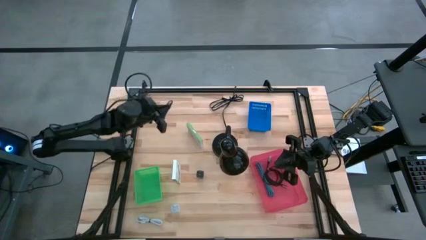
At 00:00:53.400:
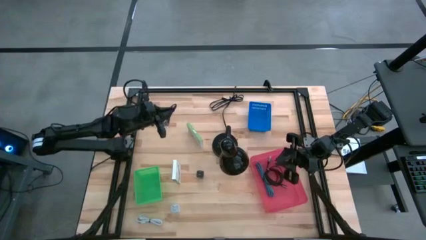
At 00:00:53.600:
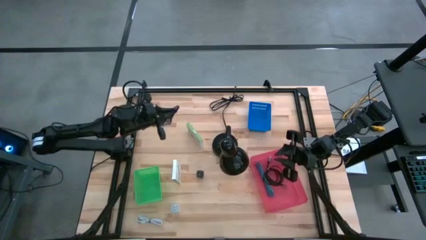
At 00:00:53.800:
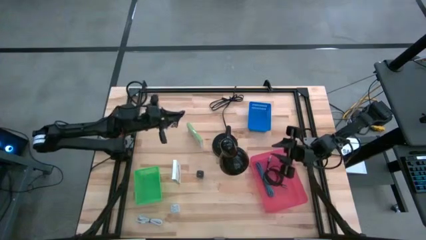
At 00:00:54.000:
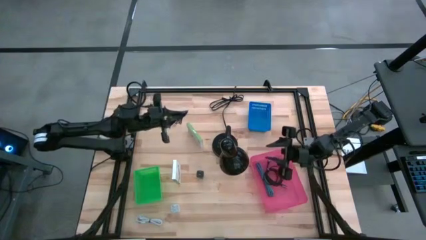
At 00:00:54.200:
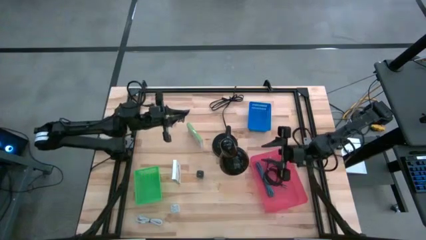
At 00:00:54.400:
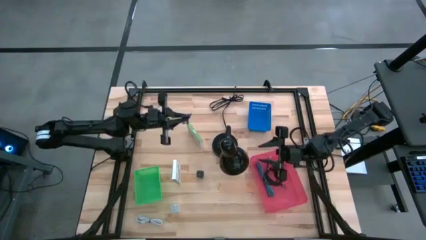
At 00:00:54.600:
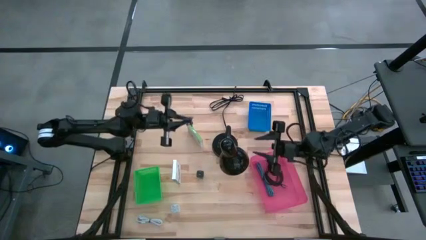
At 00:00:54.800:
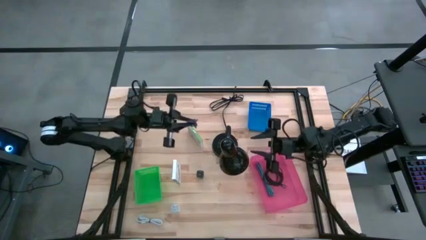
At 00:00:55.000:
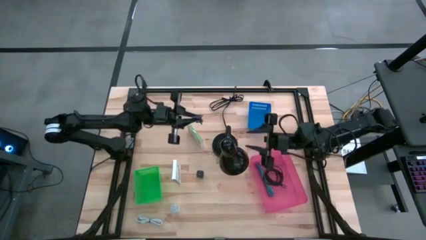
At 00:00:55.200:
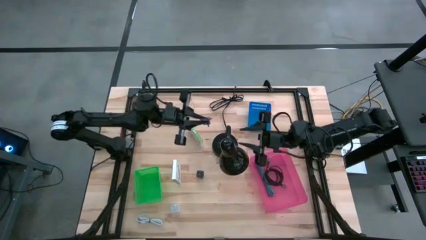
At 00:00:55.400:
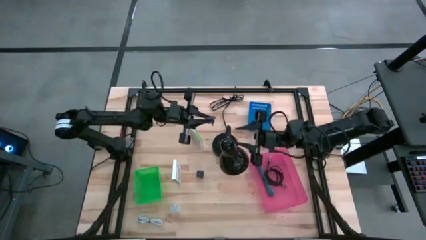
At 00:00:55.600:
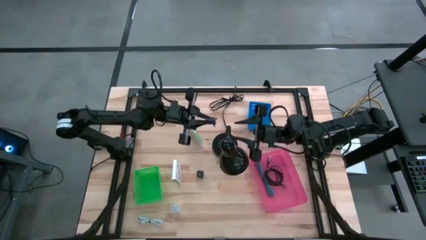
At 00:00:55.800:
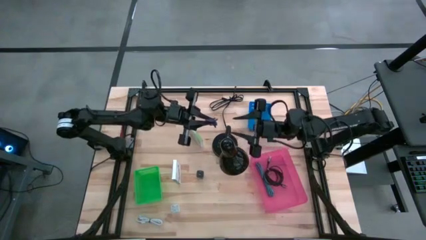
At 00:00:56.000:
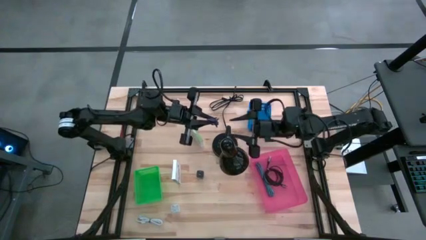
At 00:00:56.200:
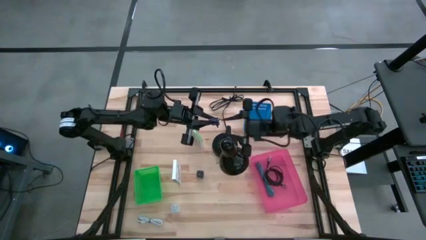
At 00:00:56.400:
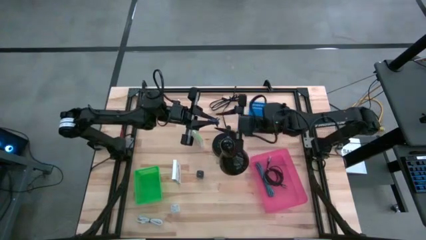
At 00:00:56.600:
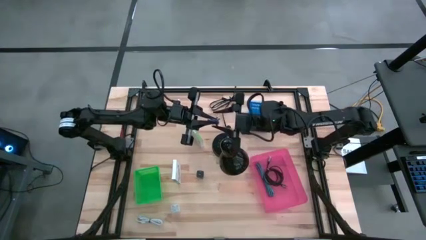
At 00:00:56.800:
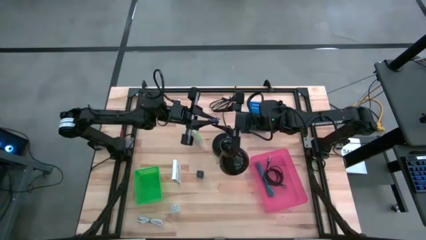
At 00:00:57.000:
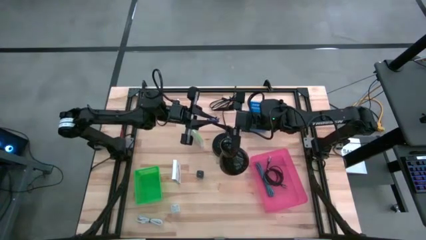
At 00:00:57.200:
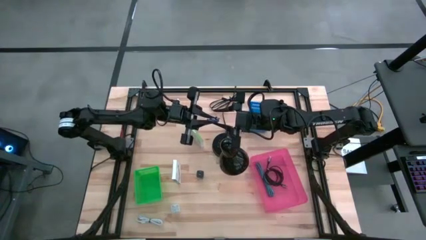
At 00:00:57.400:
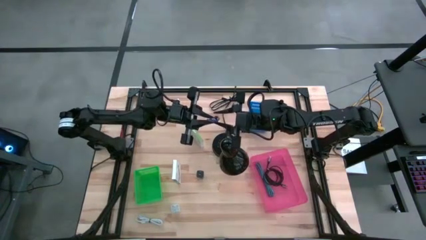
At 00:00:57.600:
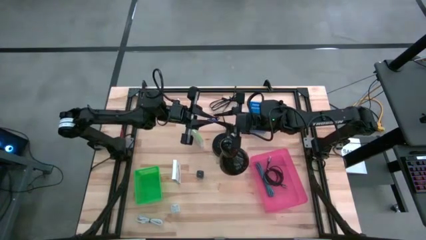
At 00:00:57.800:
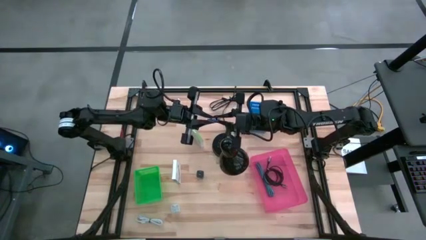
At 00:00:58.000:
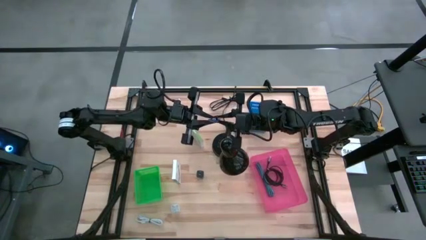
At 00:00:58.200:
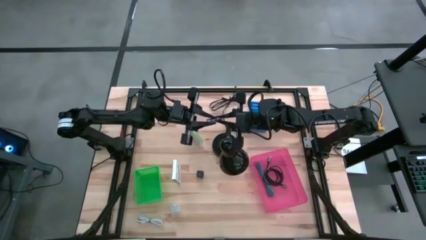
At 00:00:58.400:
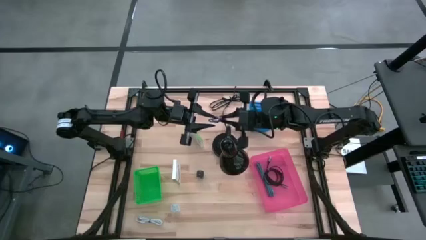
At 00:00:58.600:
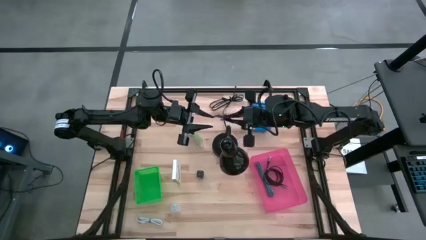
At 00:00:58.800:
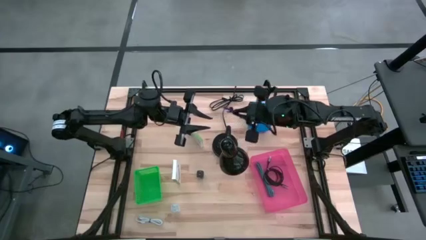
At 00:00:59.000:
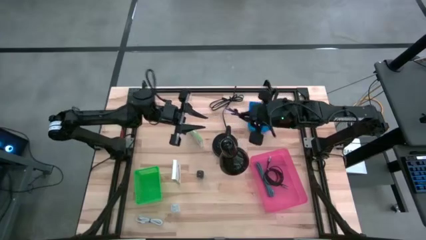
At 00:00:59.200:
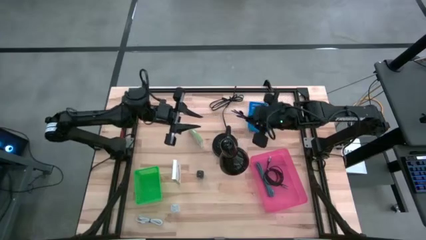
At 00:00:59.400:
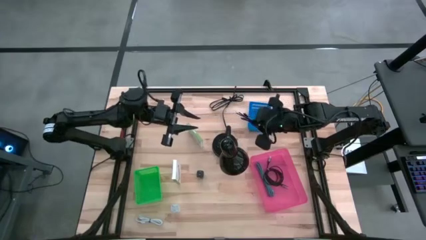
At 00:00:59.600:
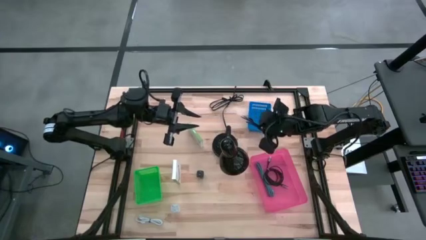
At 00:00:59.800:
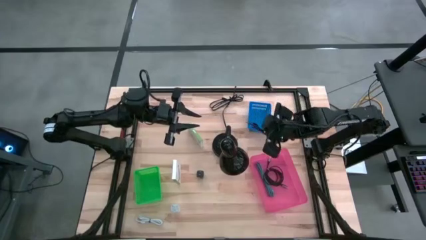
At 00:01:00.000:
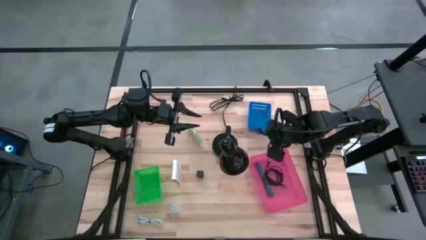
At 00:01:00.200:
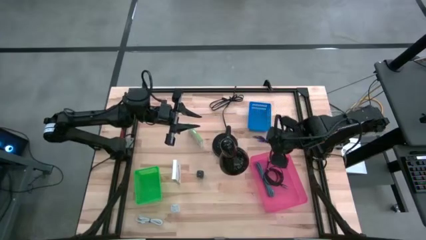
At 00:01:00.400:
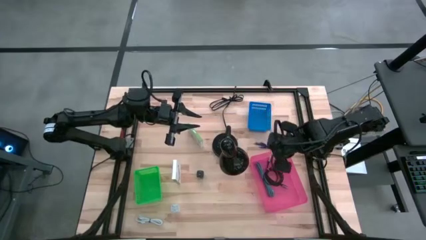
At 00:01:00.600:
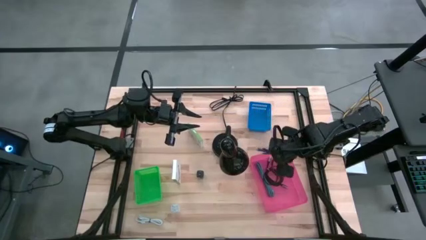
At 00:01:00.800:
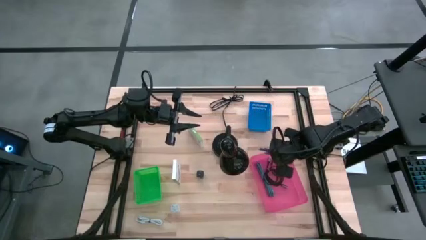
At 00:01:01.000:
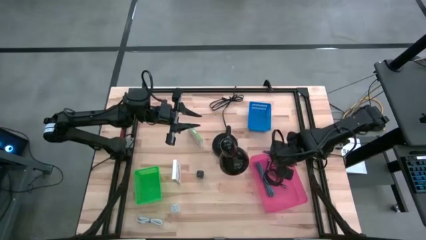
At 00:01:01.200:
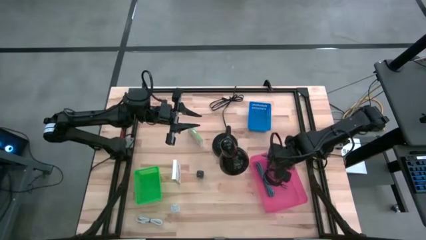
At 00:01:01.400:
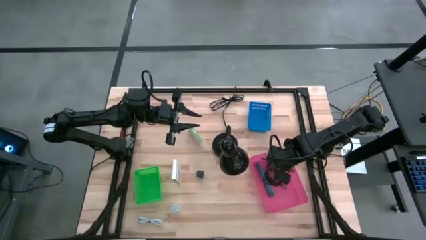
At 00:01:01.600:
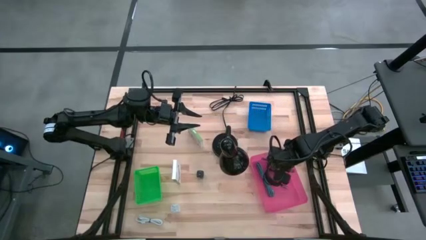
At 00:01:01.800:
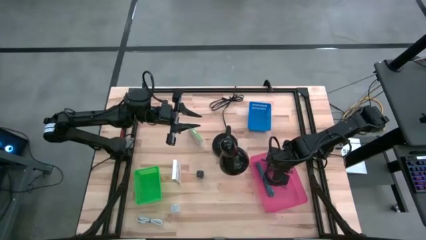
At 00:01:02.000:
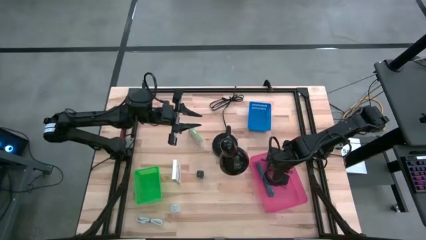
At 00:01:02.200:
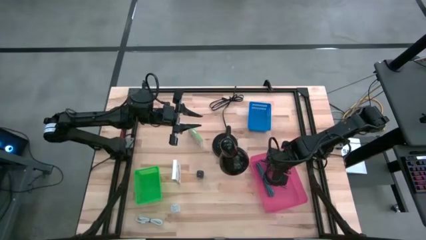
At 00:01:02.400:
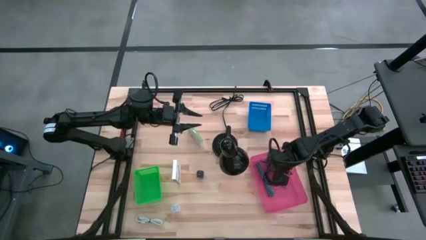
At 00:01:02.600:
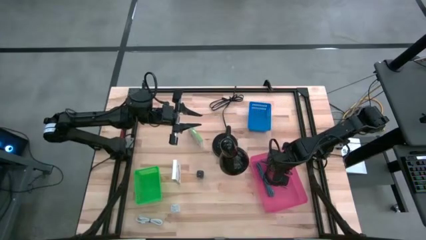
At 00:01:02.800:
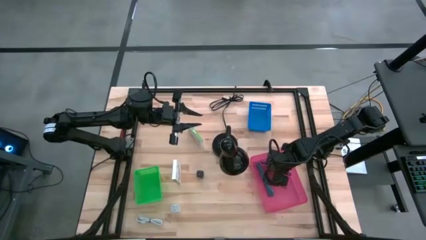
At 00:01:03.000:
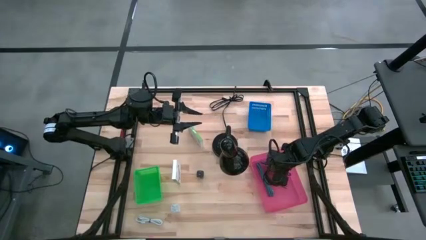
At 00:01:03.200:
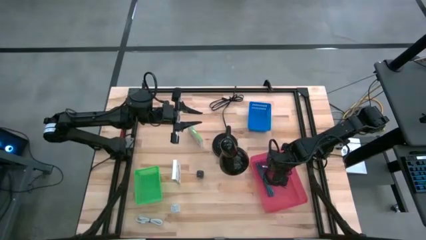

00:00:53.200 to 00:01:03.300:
Task: Pick and place items into bin
Put the purple charger cable into the red bin

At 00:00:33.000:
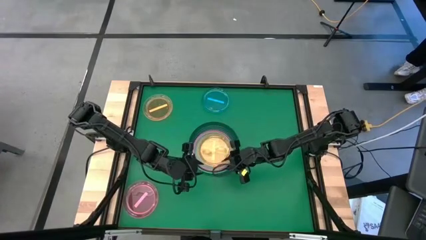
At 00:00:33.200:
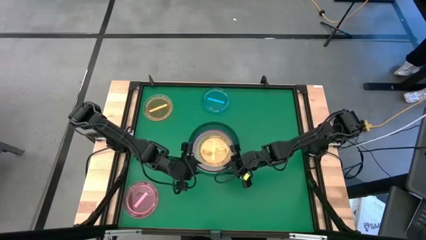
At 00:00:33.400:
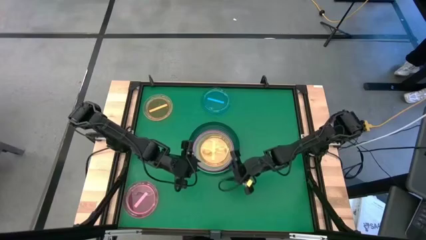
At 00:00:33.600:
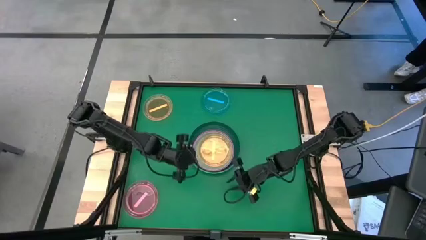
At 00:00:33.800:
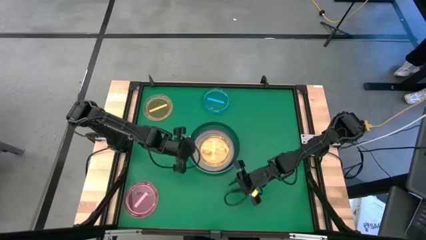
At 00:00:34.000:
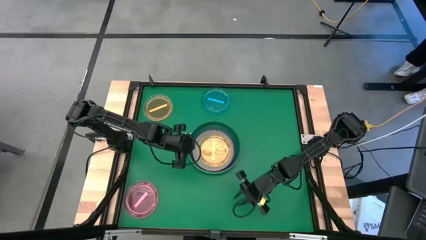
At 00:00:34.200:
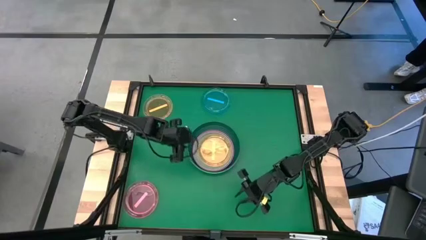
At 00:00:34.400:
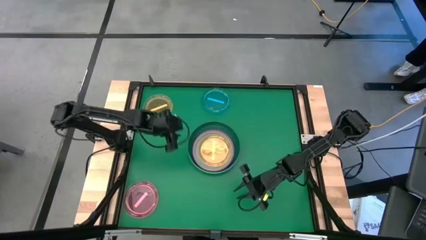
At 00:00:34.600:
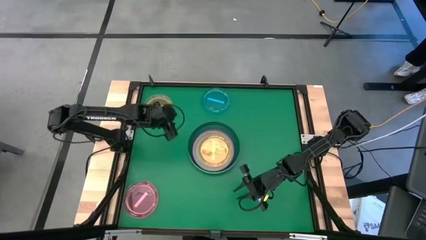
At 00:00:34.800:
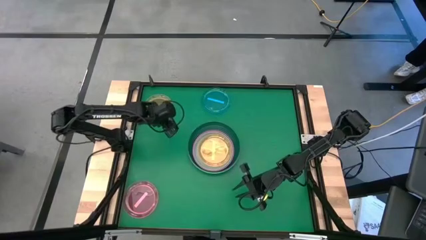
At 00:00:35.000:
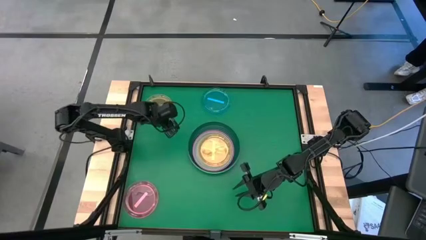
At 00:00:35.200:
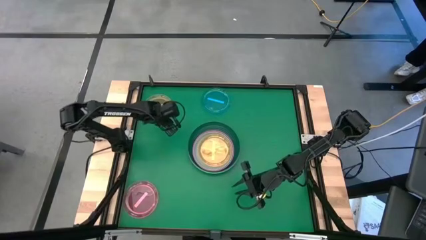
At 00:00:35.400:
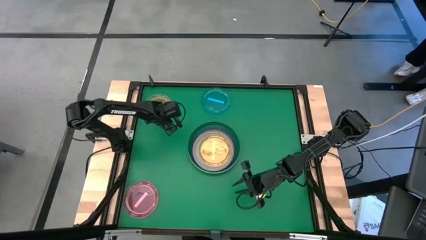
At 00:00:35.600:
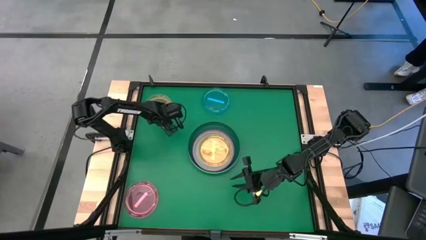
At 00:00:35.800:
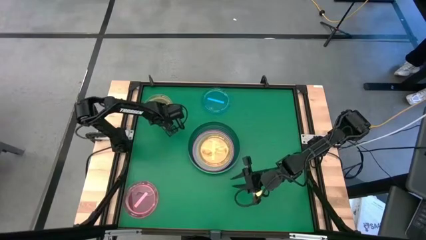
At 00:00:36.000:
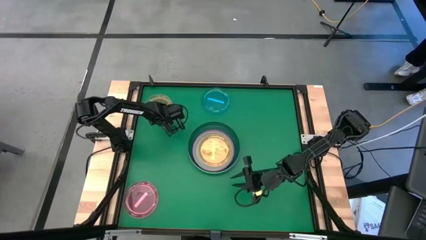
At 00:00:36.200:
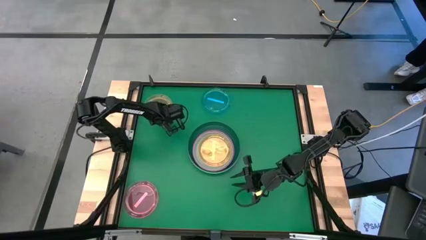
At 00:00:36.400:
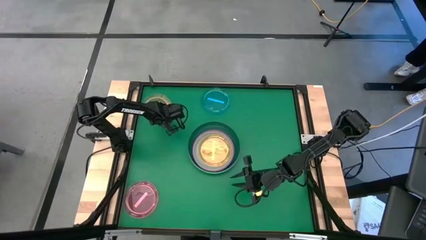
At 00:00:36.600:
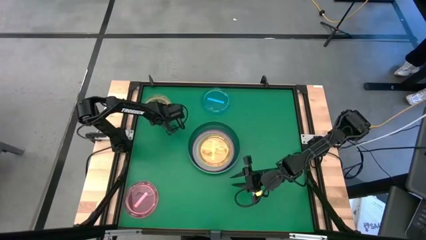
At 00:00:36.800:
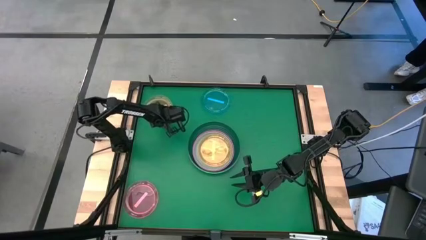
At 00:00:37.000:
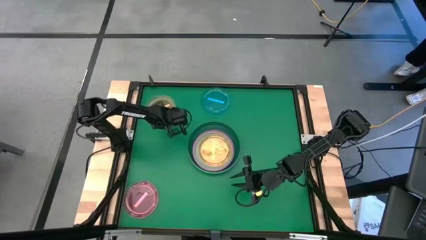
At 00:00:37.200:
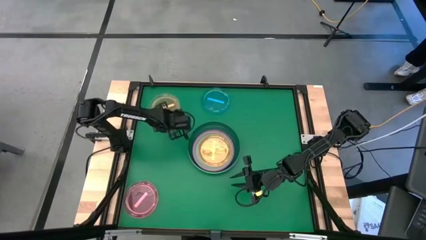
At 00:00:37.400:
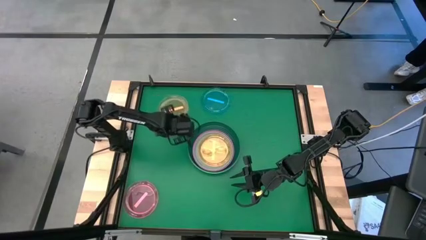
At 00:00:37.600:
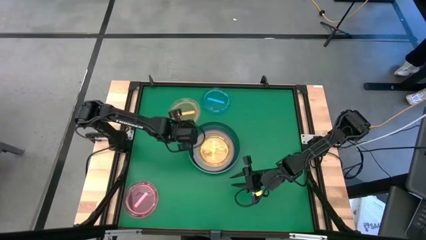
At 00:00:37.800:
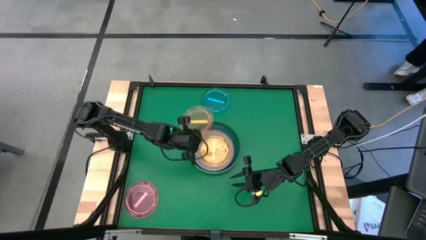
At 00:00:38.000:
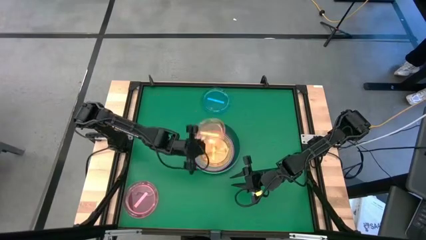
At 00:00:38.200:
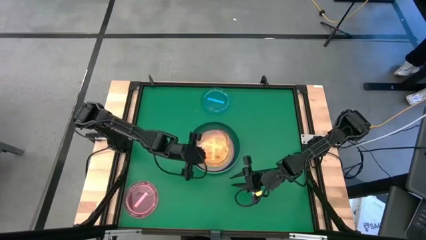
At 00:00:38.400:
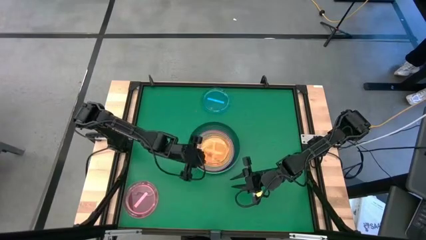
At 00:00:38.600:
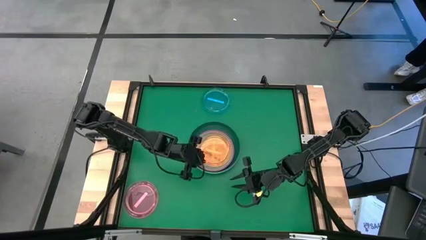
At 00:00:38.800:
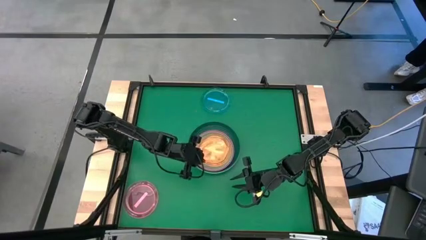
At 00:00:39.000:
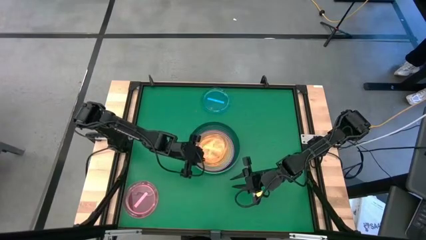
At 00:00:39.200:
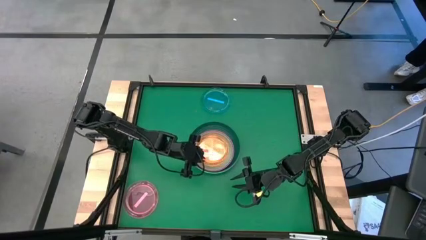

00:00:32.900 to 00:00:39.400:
Task: Stack plastic plates
Stack the orange transparent plate on top of the orange transparent plate
